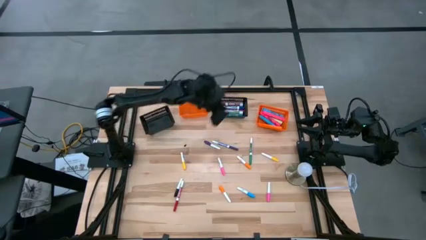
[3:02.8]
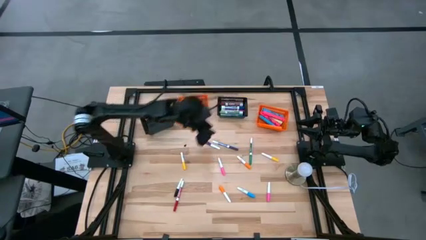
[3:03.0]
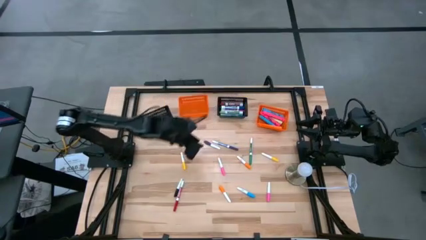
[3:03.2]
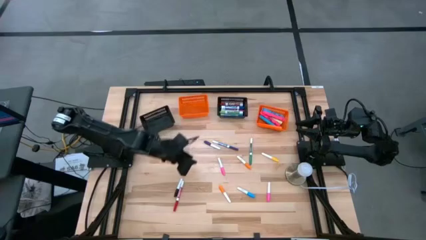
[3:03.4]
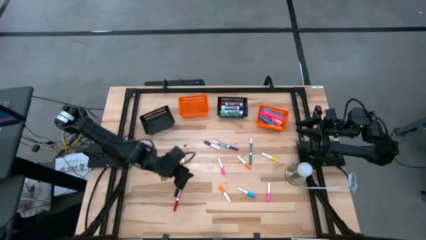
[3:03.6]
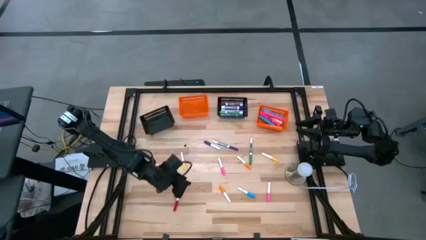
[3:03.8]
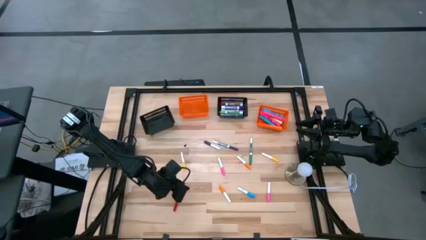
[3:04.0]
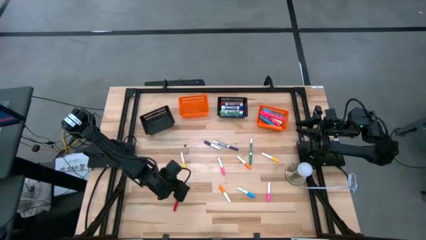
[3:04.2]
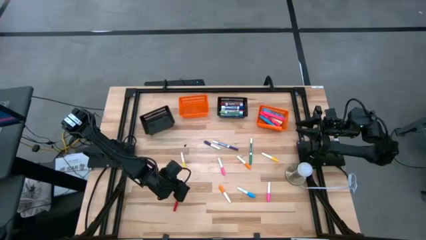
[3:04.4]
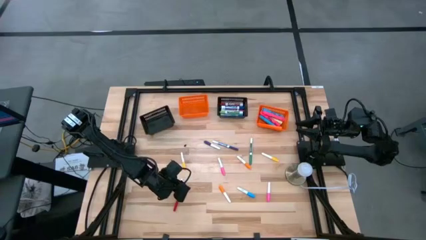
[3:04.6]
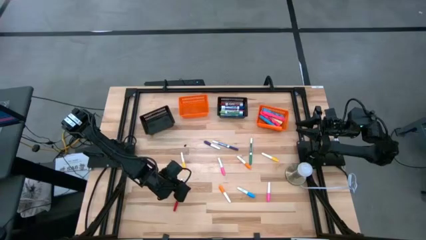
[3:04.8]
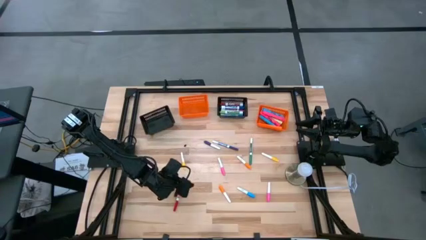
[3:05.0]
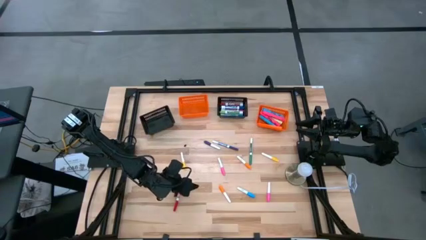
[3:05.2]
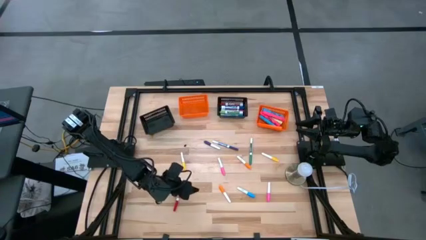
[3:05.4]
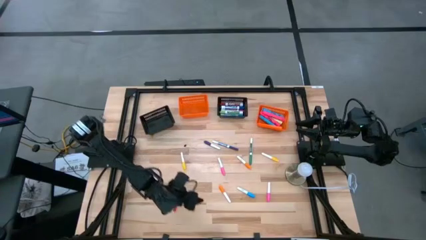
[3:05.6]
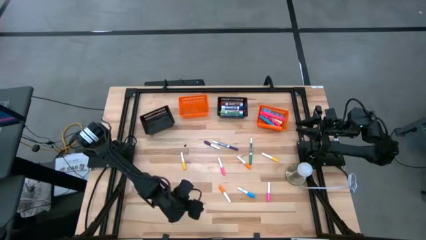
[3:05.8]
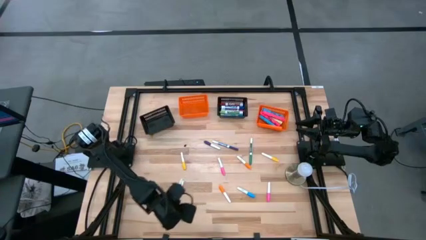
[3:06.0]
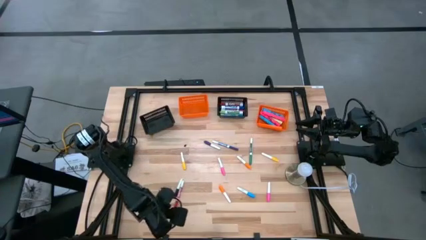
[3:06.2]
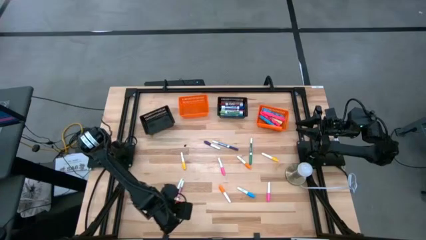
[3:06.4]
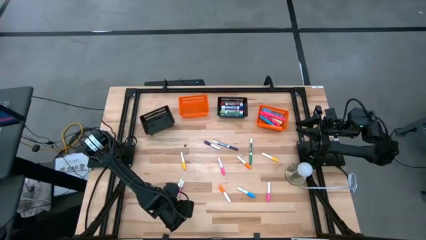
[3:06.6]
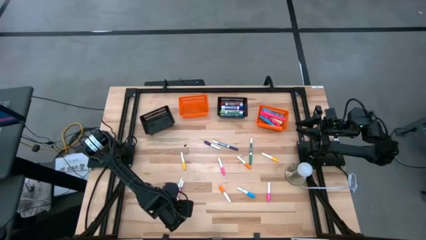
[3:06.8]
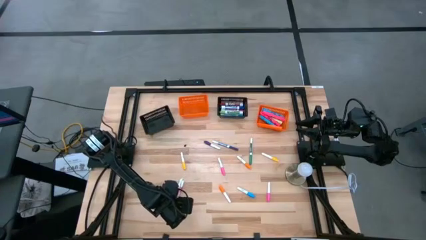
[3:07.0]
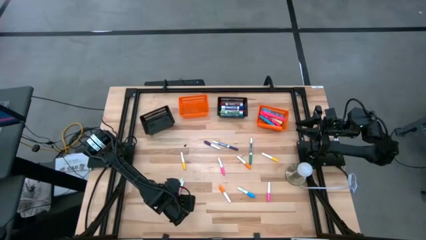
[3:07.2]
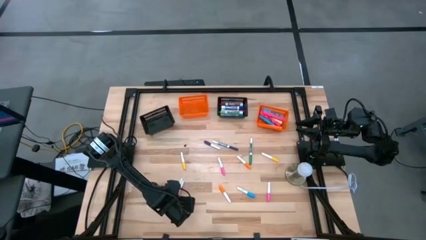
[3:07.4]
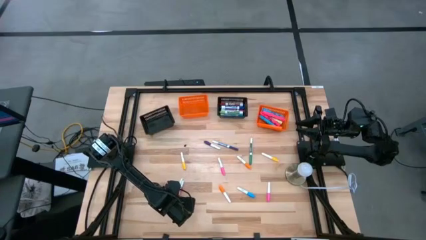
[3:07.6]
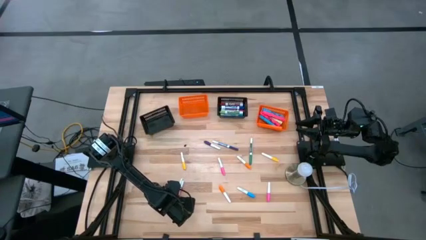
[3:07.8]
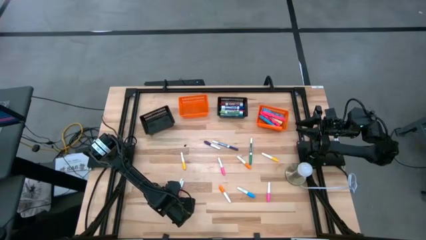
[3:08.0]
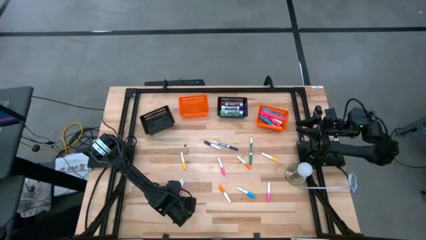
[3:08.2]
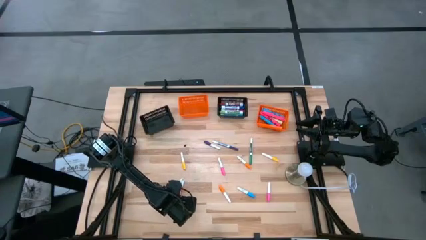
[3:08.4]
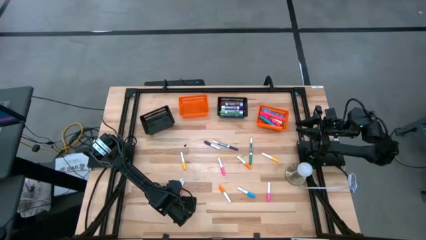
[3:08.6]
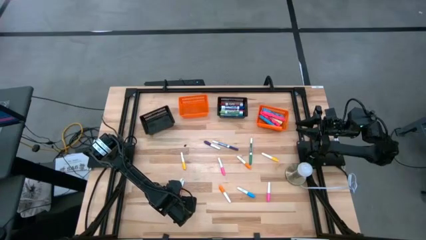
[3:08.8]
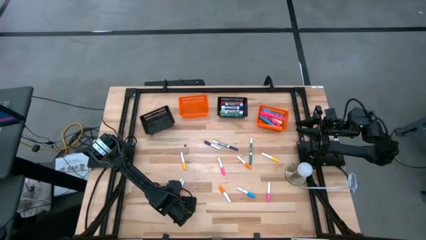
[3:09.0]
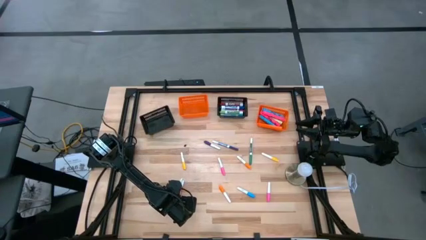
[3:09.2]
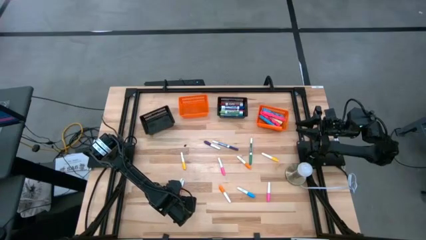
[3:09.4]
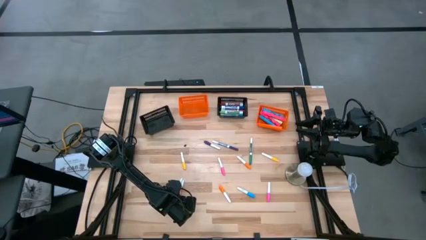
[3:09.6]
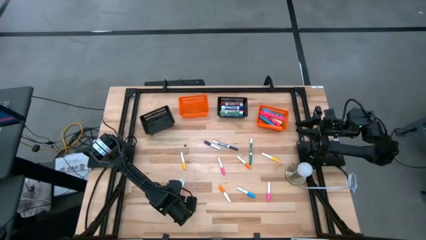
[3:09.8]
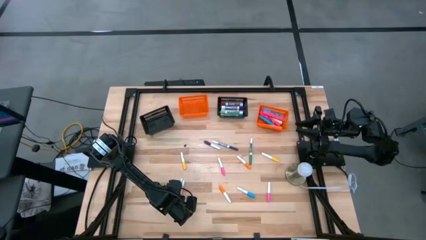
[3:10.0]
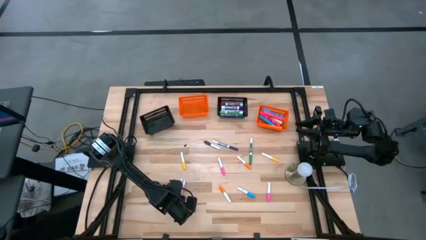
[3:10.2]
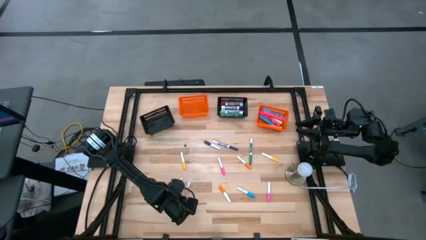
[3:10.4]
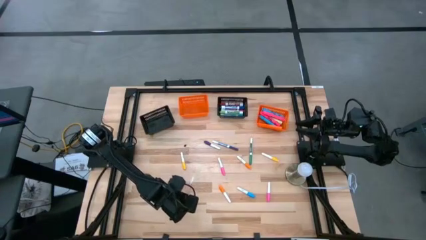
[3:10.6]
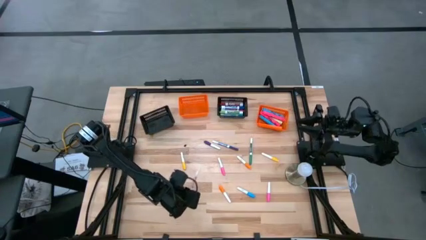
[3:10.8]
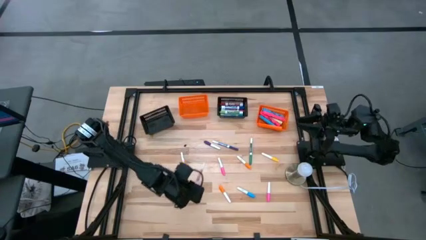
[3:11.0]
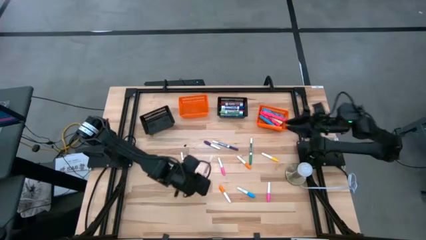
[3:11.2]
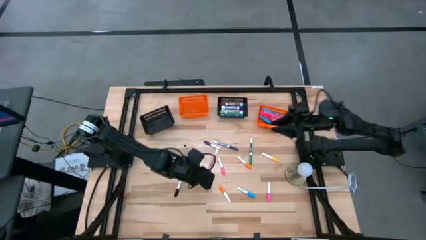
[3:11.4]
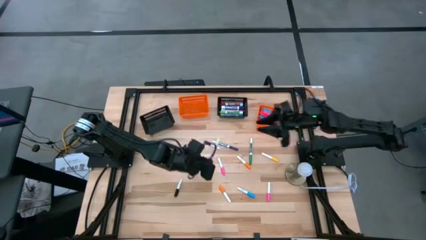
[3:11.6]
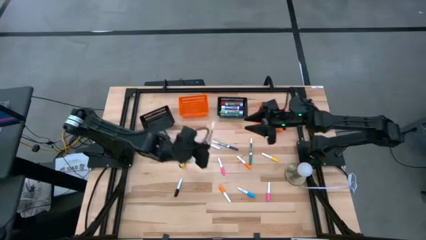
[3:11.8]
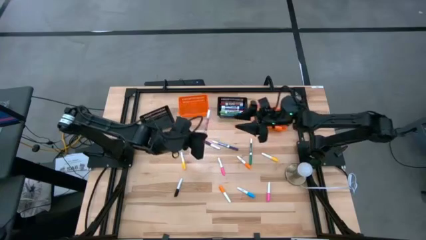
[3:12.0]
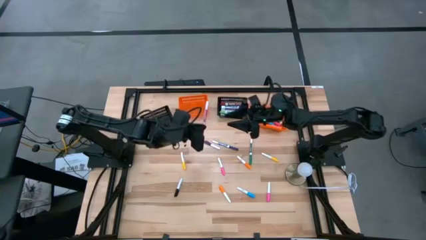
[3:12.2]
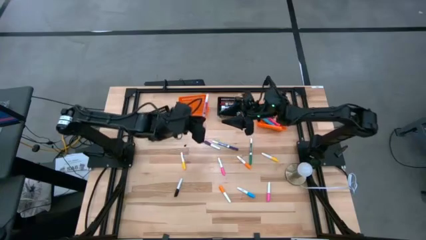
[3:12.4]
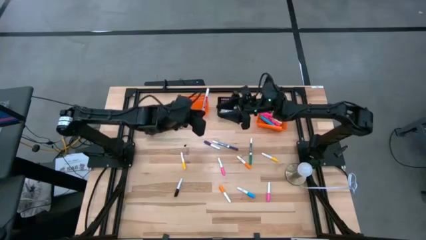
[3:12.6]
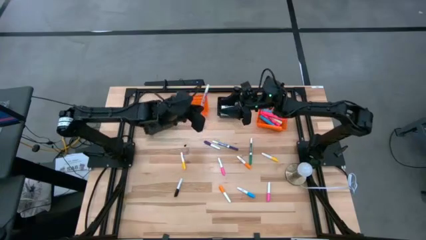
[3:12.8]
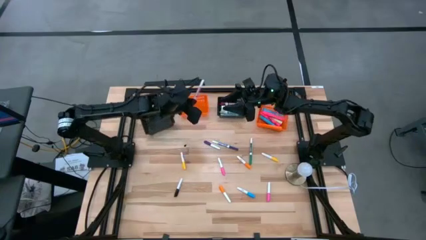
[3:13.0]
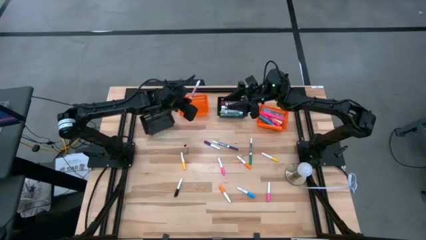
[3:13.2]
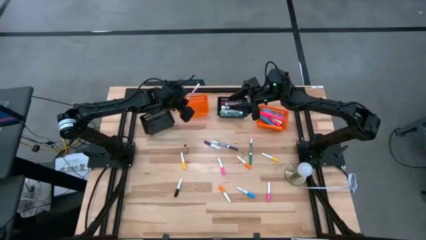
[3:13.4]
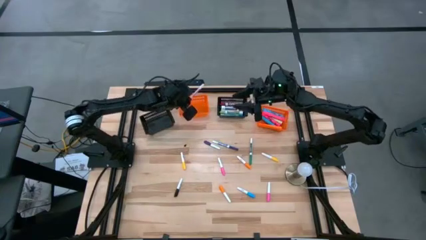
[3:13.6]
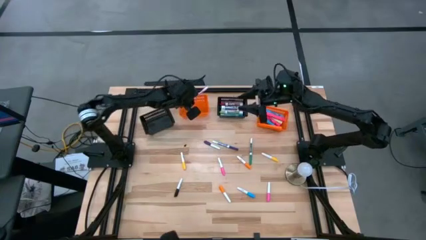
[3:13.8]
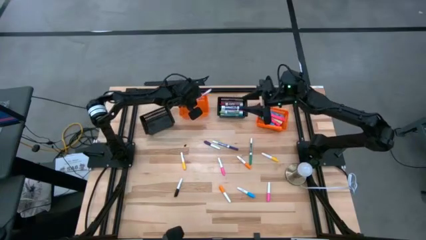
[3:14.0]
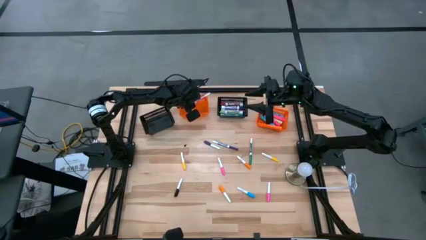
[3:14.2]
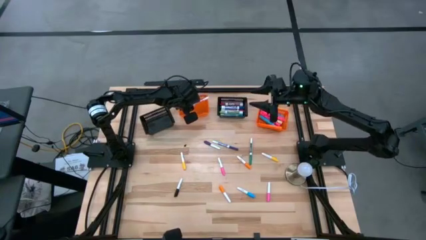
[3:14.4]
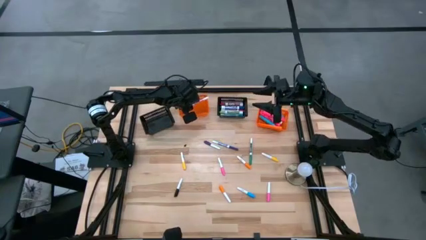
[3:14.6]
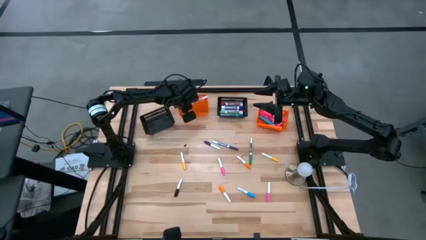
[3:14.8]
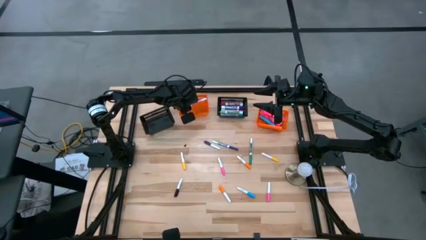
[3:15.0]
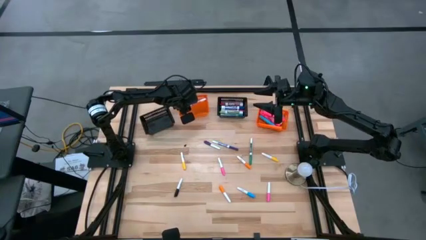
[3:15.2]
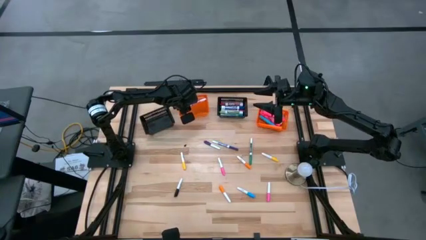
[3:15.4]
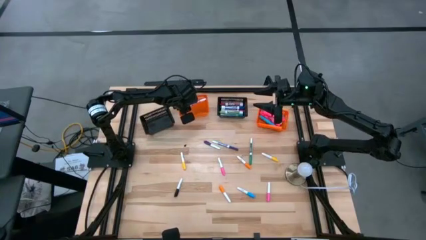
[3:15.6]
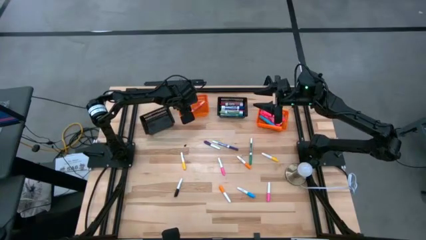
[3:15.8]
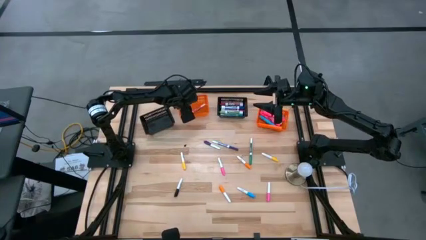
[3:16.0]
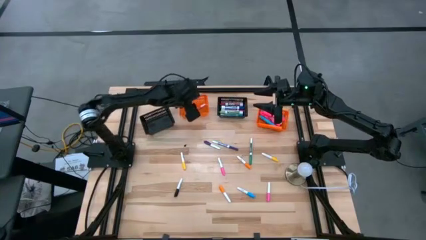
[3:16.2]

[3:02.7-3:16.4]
Task: Pick & Place Markers
Put the red marker into the left orange bin

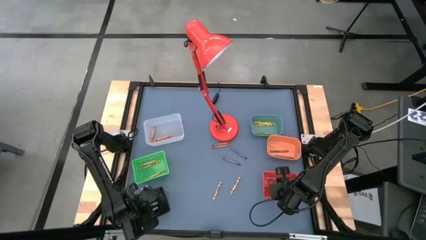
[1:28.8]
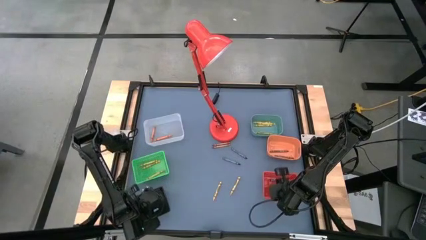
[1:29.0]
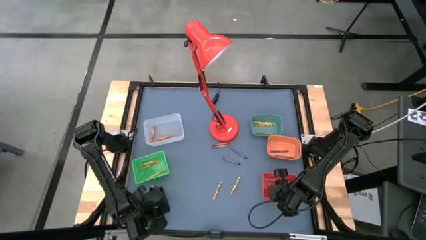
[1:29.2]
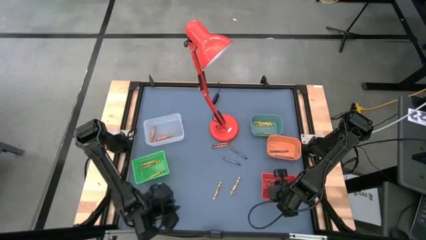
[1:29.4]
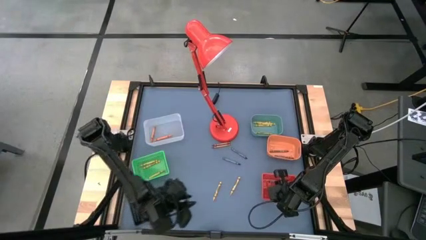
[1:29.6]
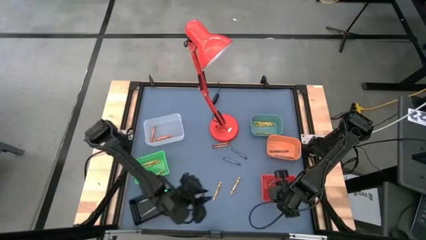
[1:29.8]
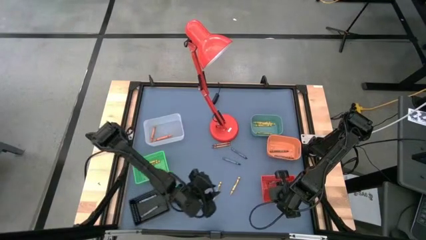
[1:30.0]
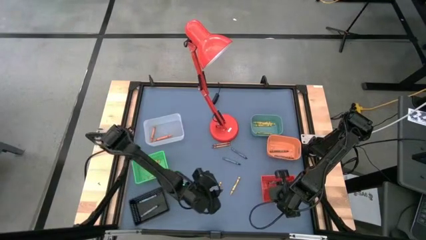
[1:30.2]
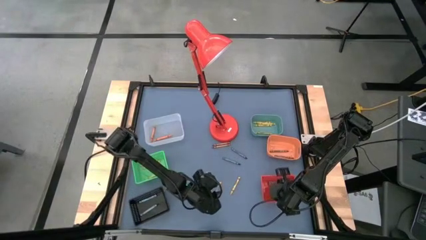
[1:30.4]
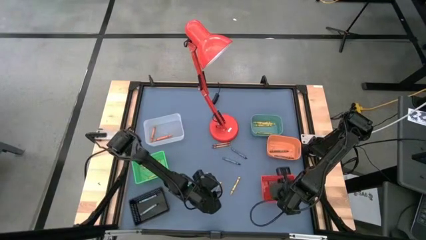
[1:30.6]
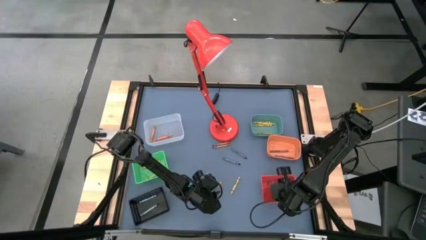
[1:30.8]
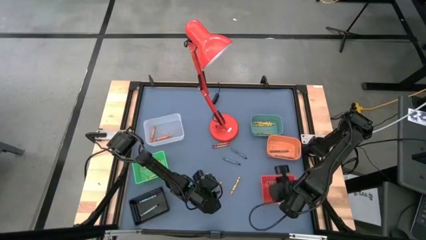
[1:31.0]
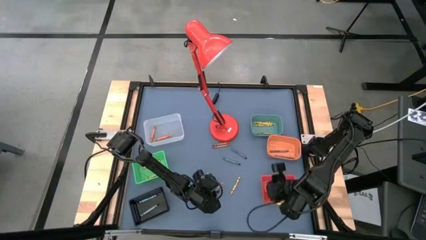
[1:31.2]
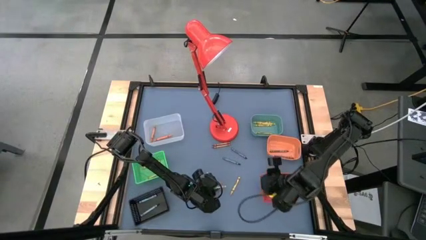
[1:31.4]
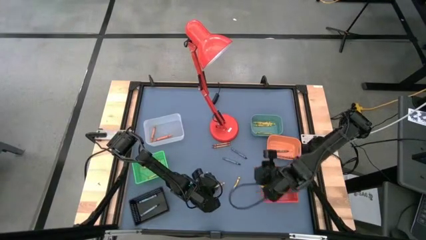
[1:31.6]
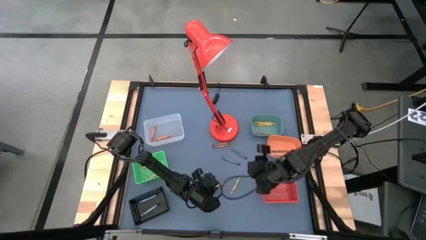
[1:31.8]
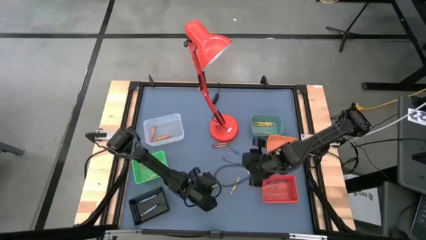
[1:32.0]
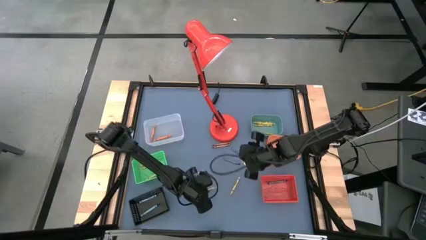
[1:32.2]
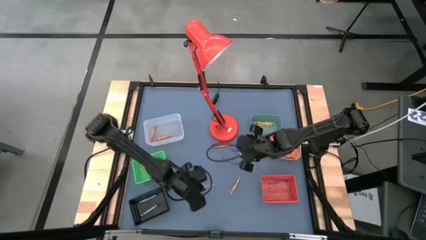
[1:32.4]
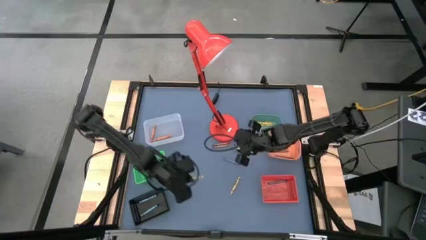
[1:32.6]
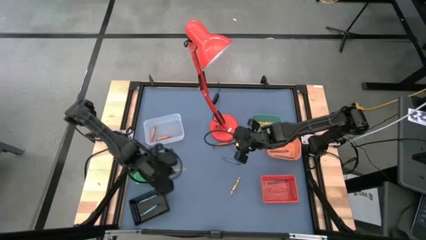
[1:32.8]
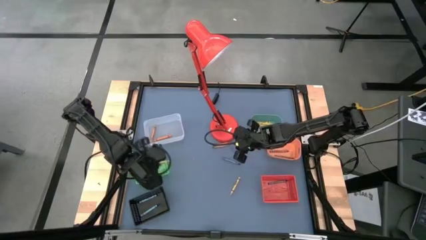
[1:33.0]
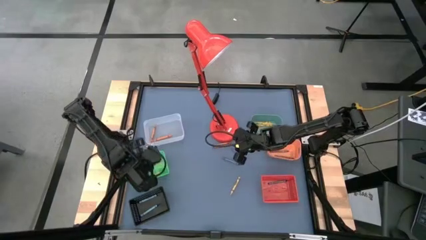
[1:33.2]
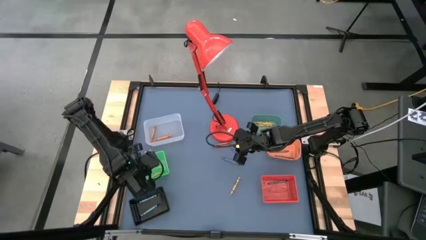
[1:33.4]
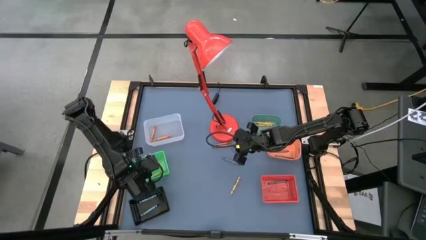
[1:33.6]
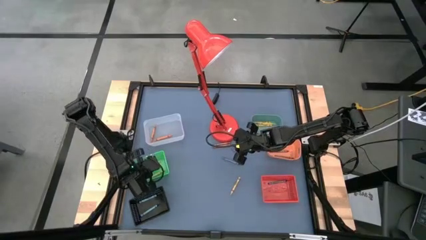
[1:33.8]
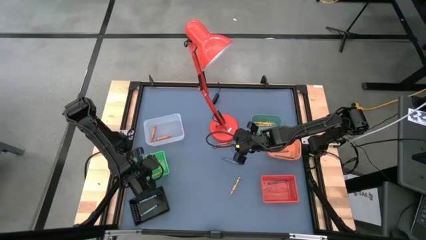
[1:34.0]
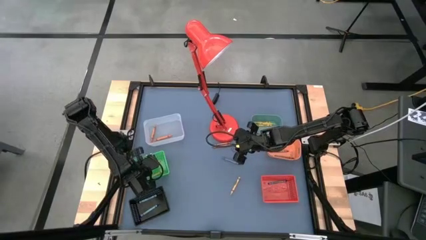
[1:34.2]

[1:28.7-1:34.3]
Task: Sort crayons
Put the golden crayon into the green bin
